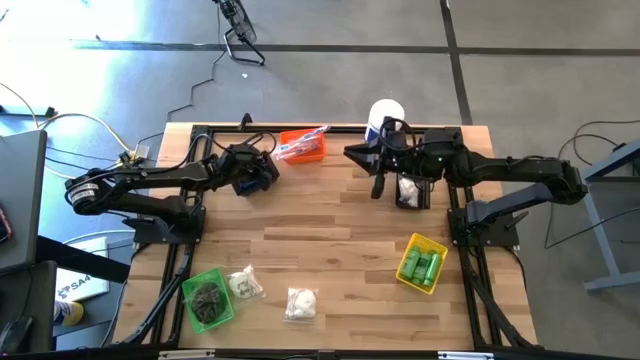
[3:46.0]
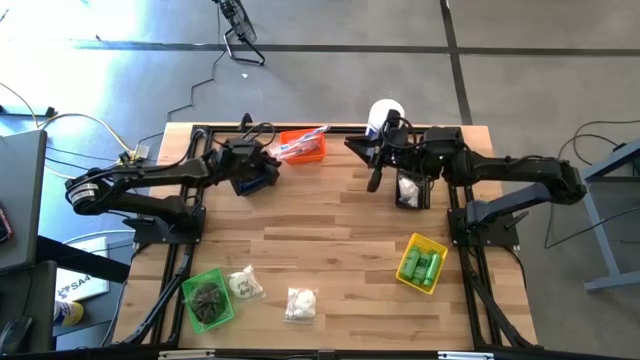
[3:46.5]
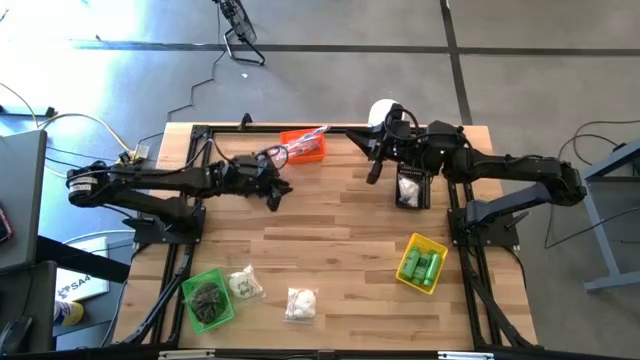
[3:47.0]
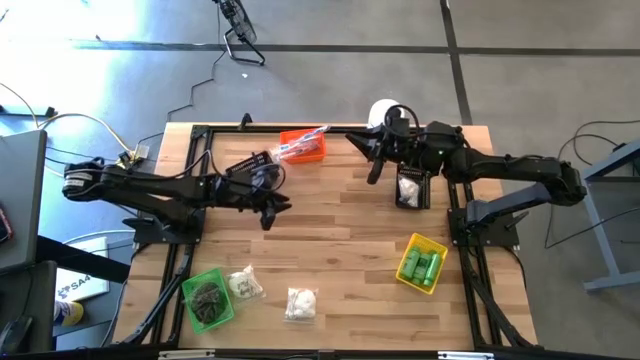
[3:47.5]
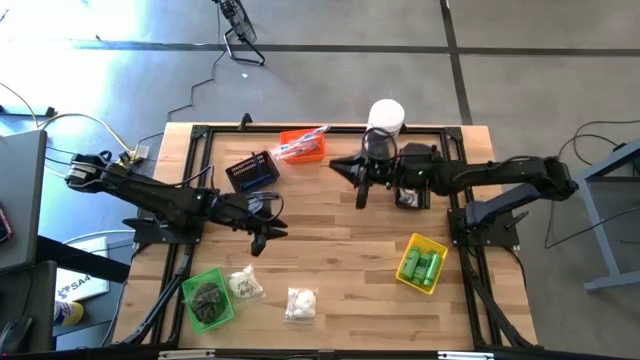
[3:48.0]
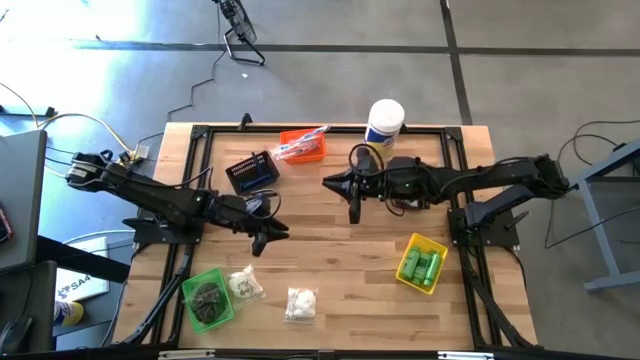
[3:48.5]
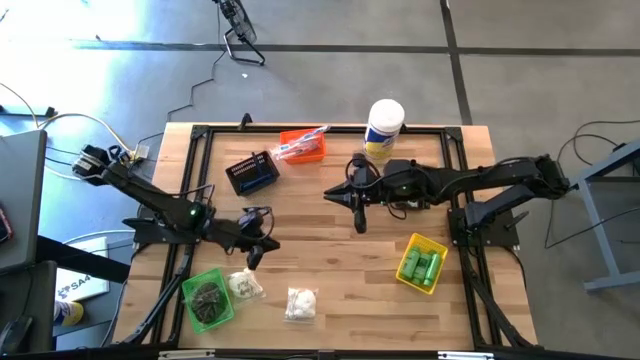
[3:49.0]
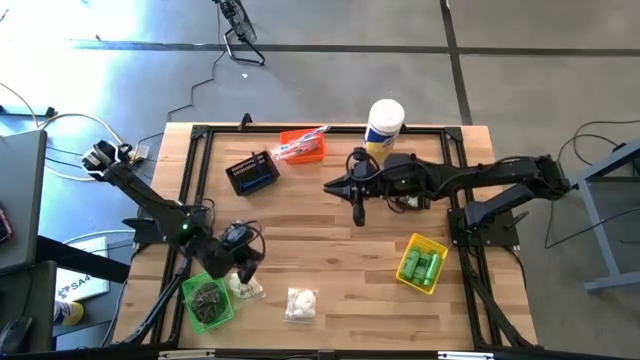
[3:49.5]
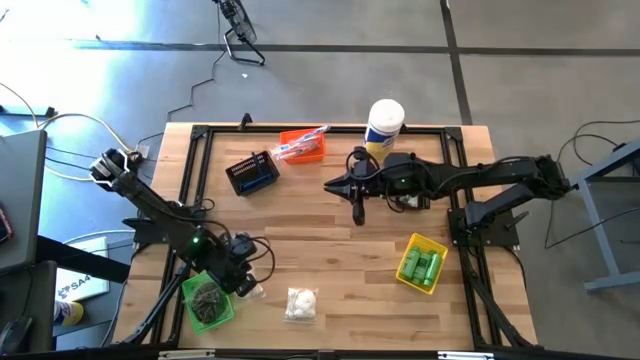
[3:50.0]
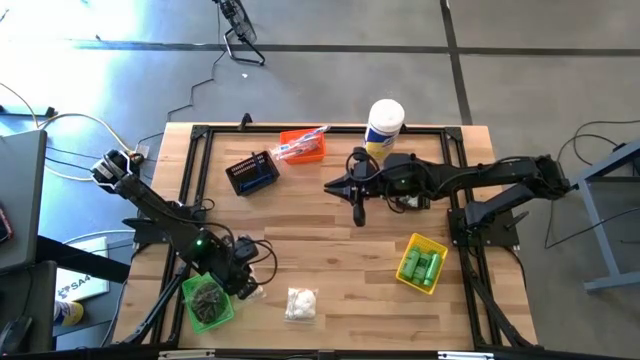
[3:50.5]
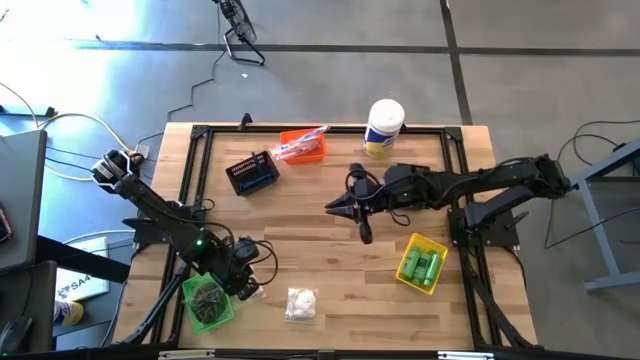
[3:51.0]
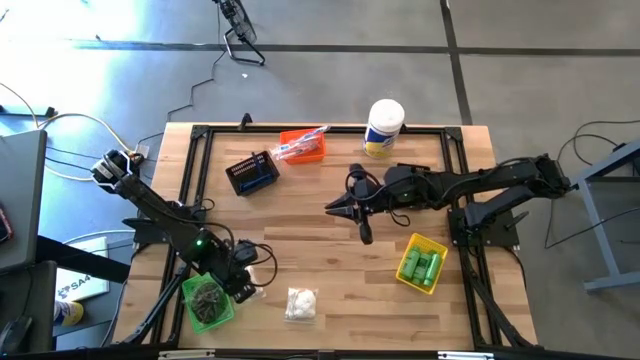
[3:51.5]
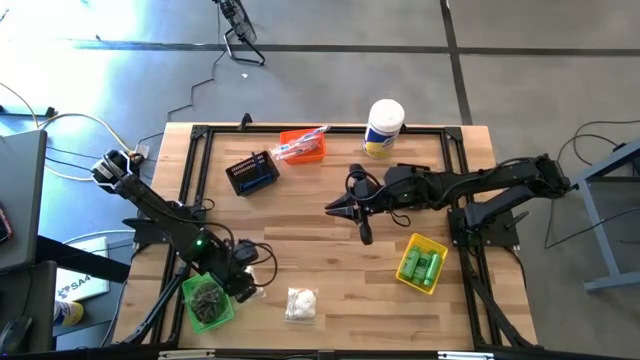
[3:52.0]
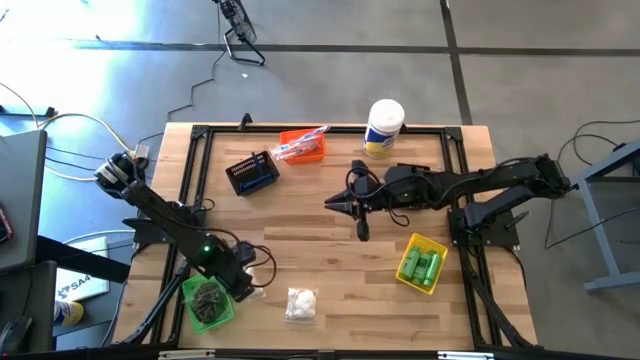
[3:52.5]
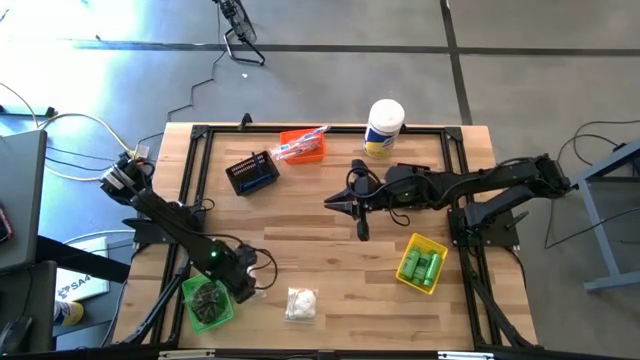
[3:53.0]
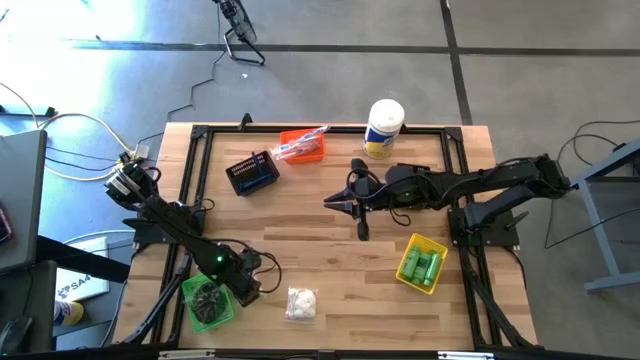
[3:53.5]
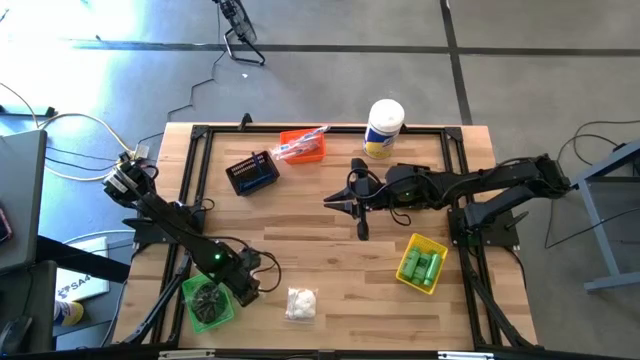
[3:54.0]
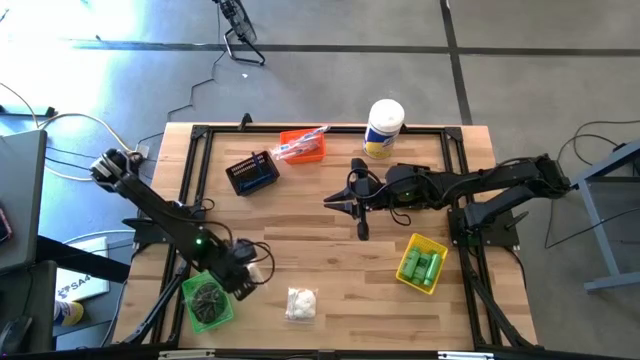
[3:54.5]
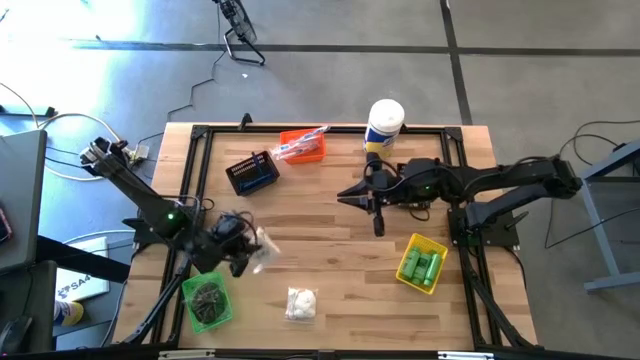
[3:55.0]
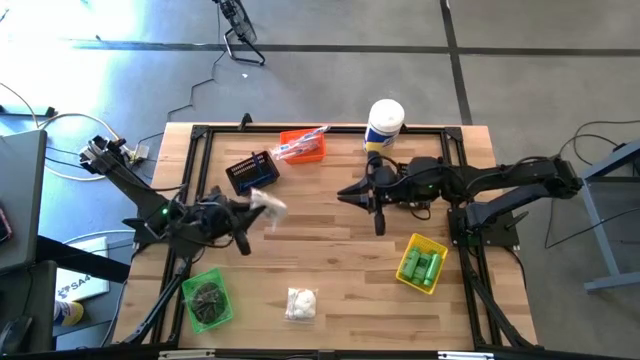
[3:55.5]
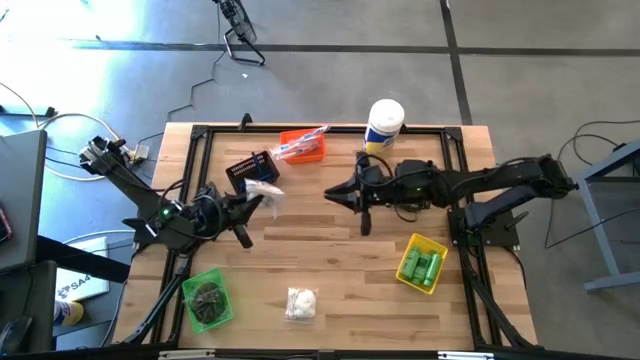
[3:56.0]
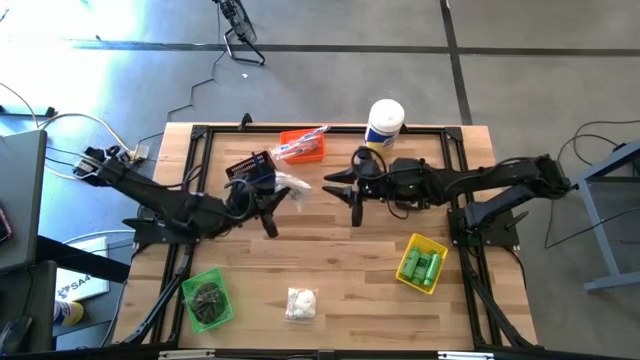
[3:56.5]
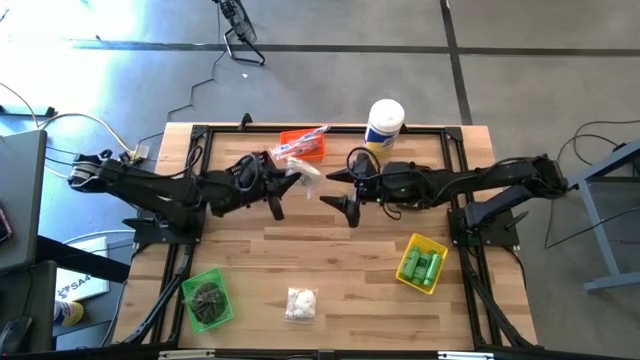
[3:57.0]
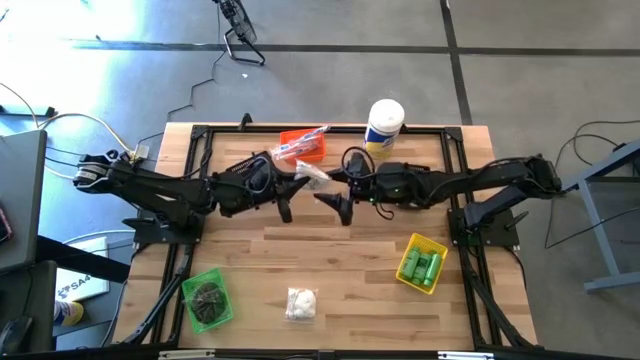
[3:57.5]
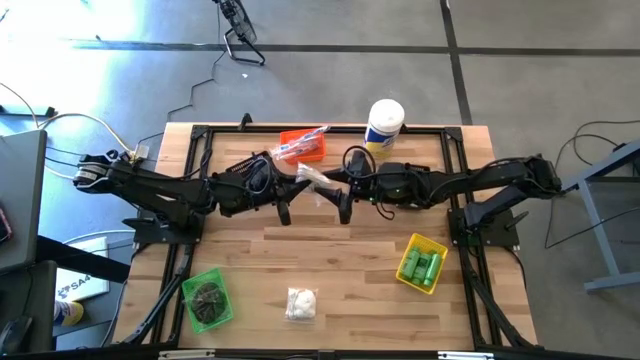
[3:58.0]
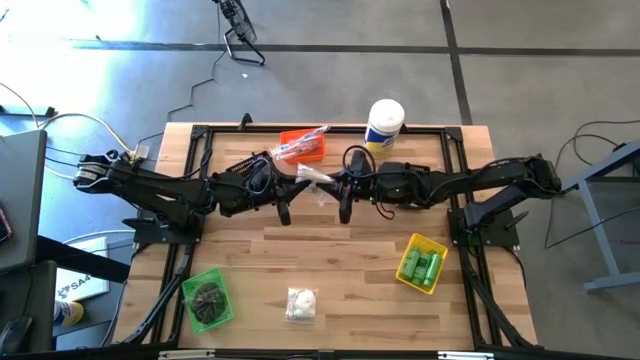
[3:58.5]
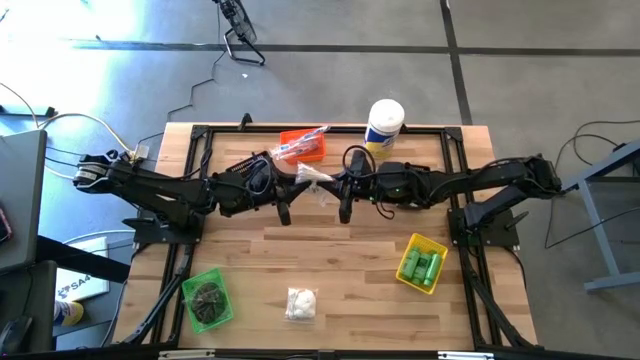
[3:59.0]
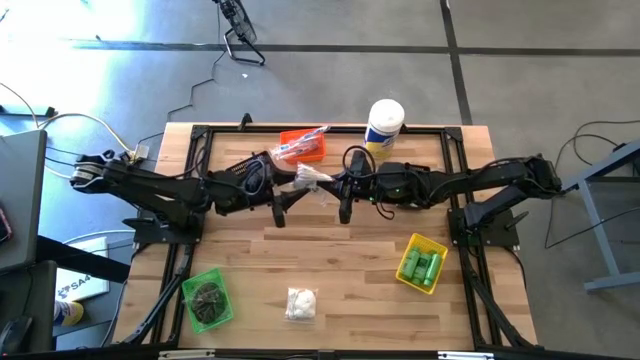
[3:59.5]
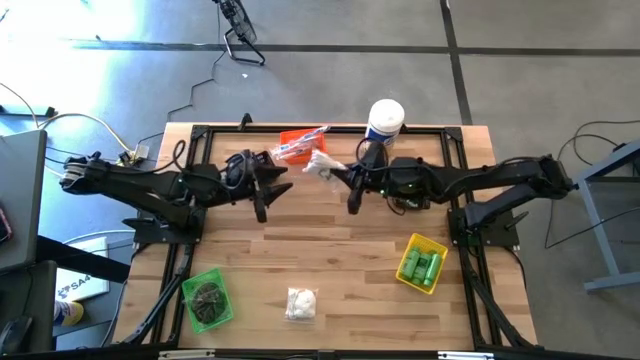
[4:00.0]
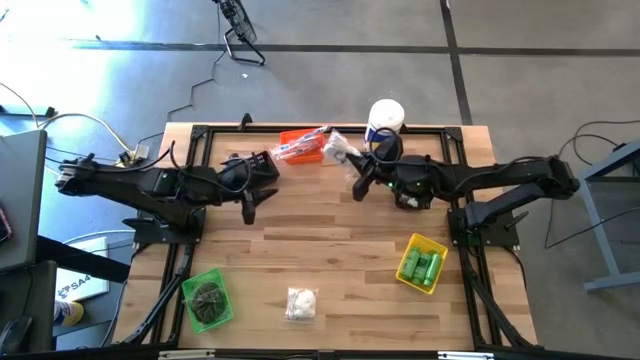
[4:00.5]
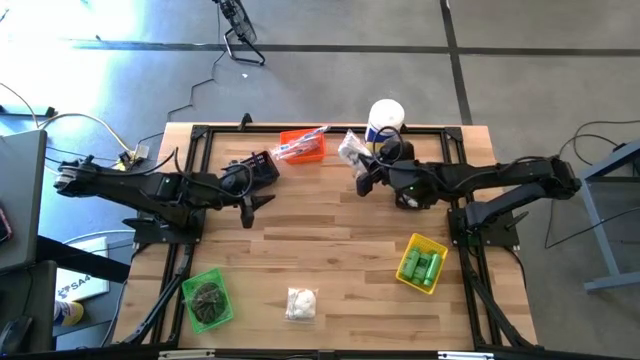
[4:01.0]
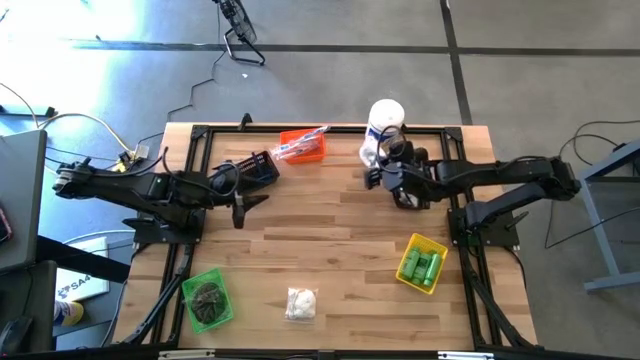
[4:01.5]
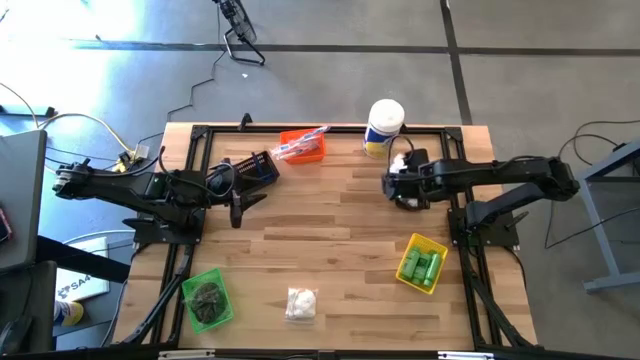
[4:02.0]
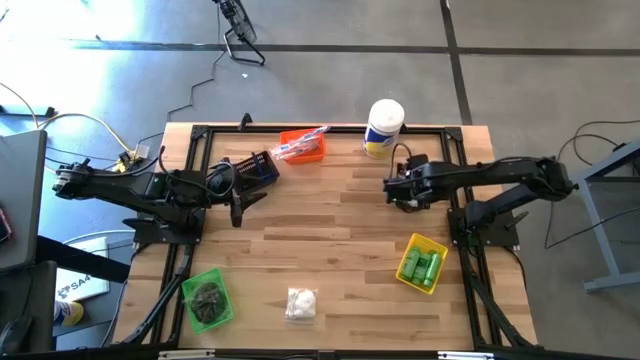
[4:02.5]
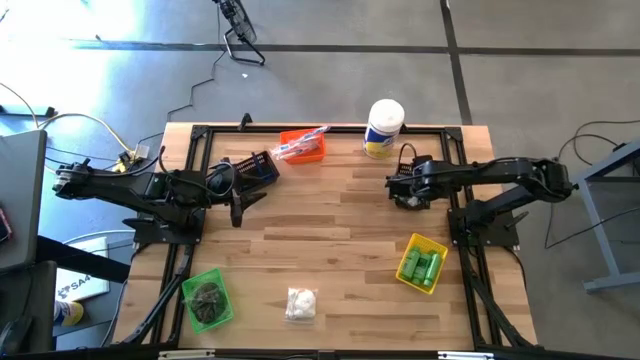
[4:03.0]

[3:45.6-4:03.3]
Task: Pick & Place Travel size toiletries
Put the white cotton pack into the right black bin

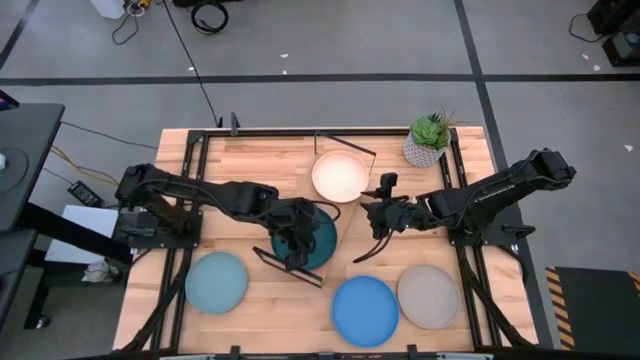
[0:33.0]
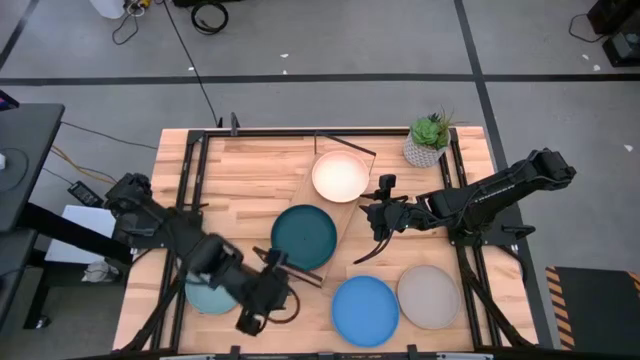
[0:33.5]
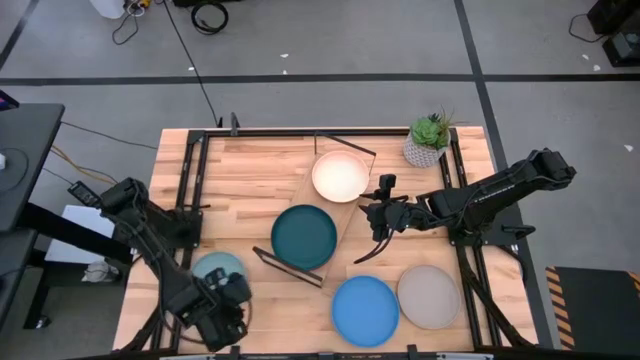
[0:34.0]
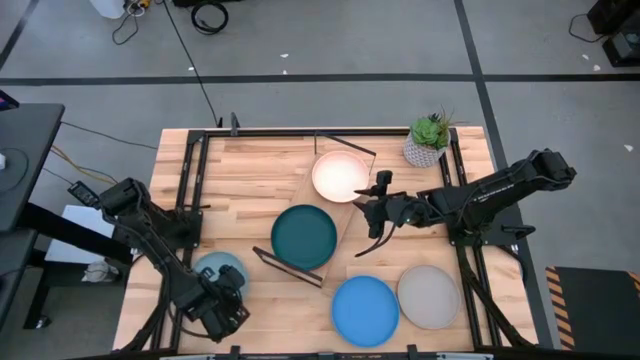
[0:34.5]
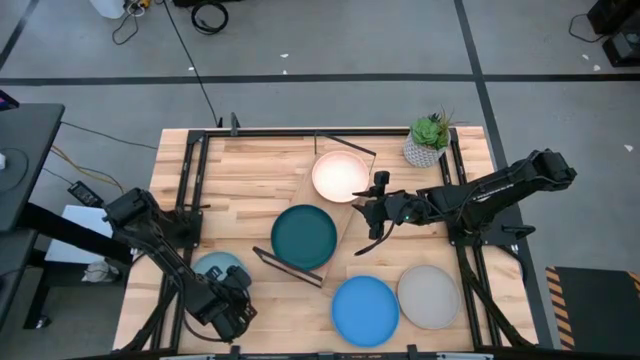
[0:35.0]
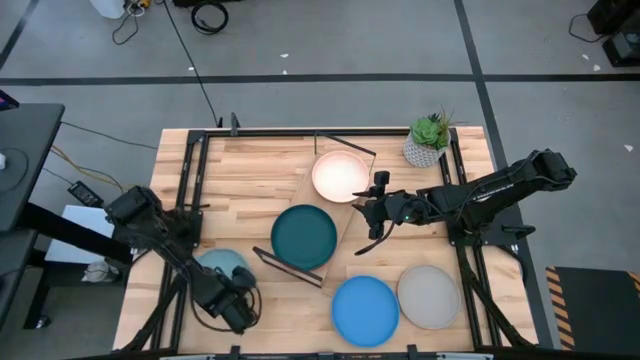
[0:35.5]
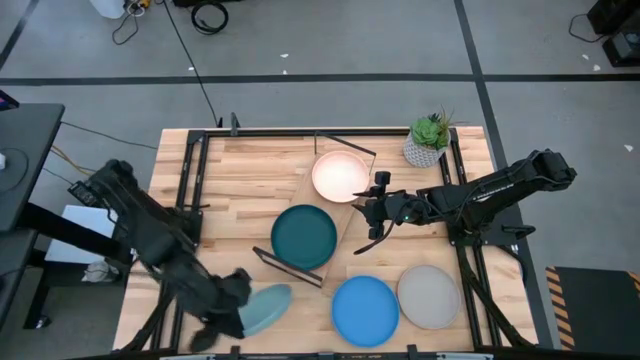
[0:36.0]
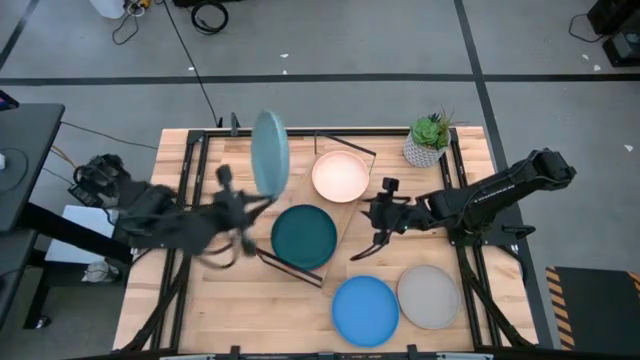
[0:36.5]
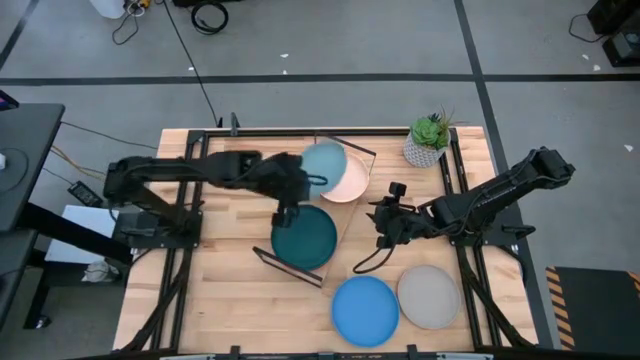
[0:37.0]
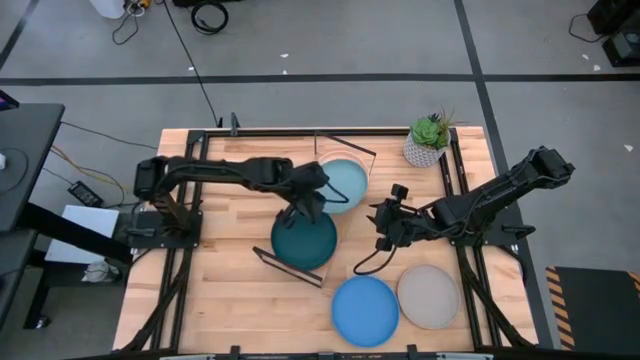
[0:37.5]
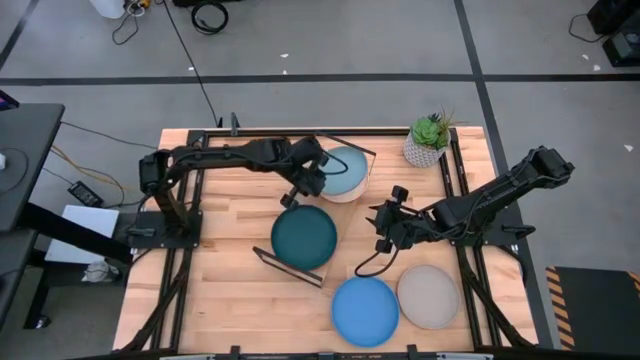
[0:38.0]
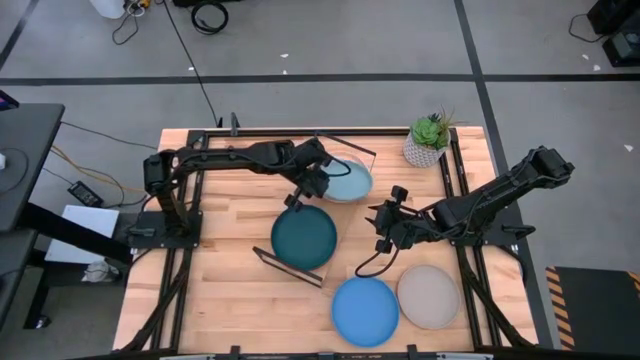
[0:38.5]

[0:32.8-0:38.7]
Task: Place and stack plates onto a shelf
Stack the light blue plate on top of the white plate on the shelf
